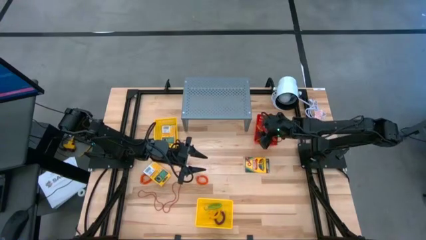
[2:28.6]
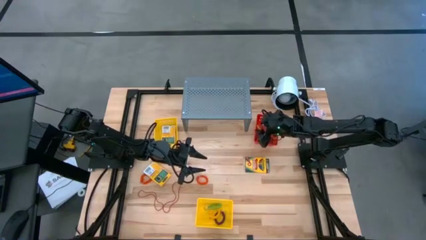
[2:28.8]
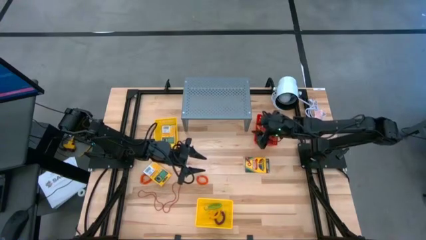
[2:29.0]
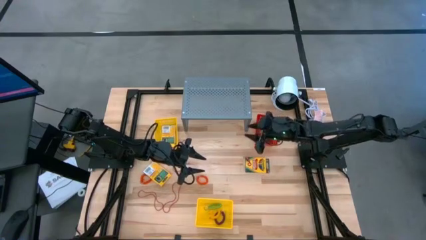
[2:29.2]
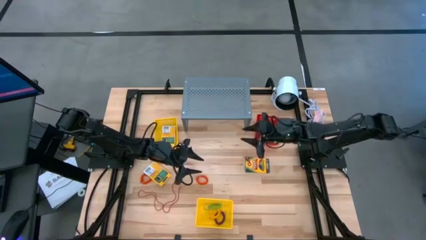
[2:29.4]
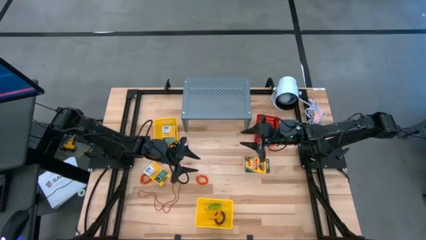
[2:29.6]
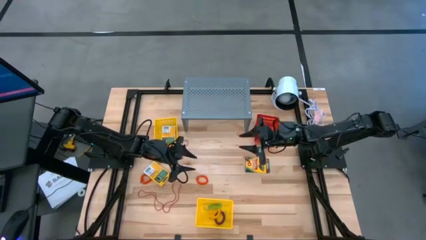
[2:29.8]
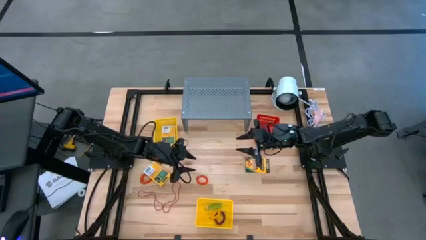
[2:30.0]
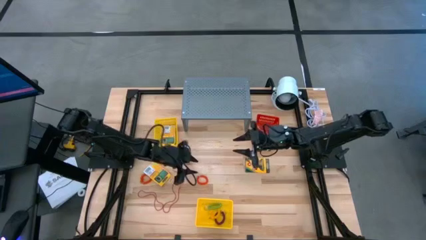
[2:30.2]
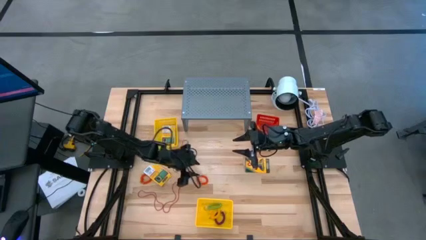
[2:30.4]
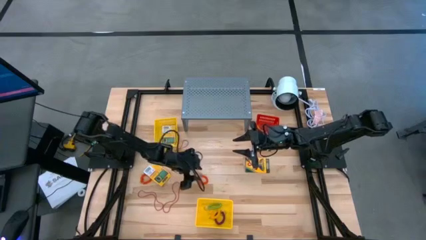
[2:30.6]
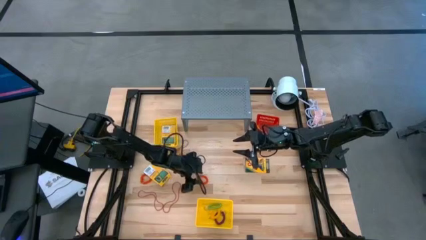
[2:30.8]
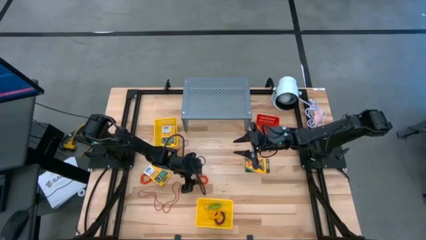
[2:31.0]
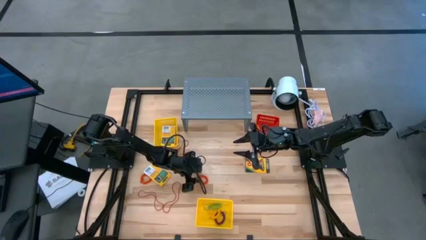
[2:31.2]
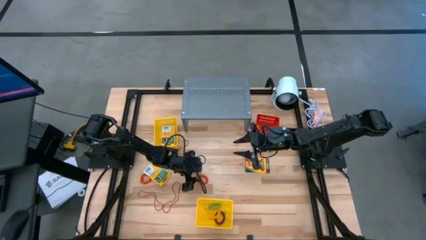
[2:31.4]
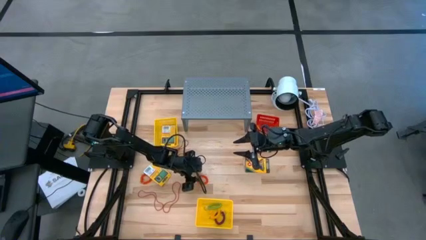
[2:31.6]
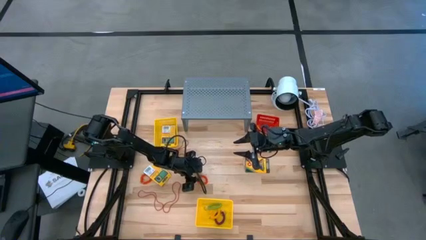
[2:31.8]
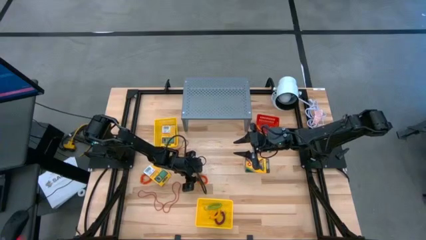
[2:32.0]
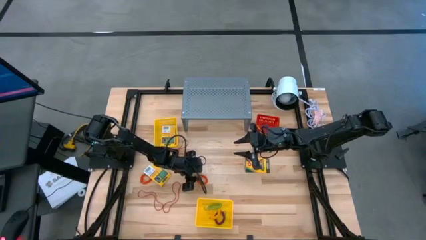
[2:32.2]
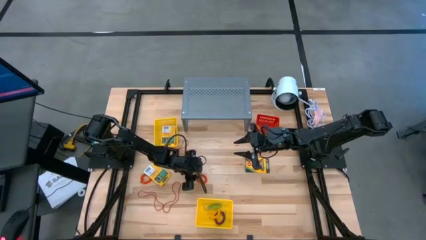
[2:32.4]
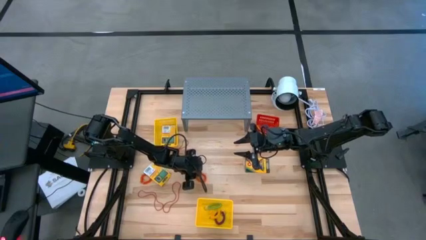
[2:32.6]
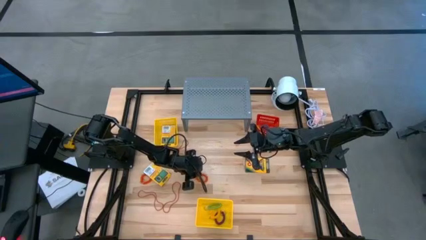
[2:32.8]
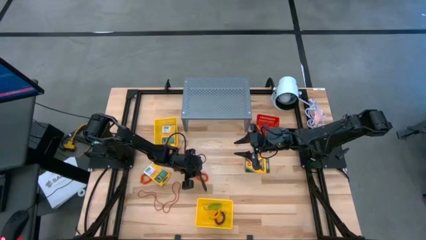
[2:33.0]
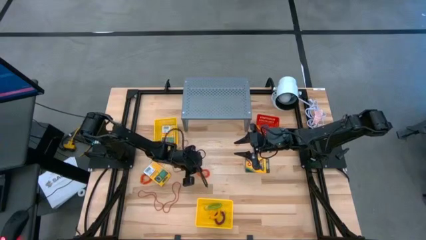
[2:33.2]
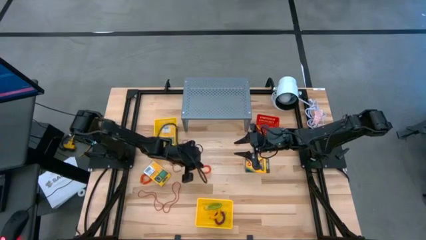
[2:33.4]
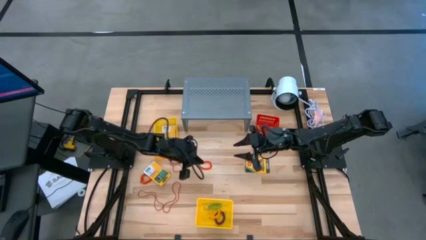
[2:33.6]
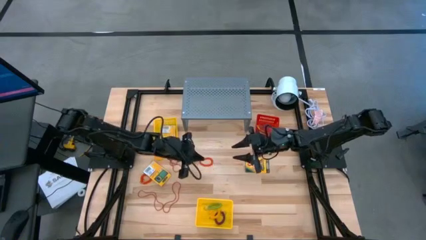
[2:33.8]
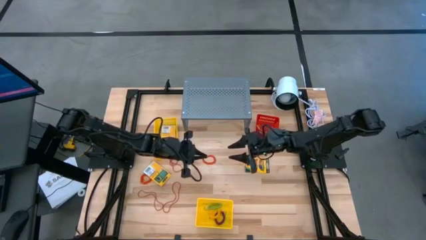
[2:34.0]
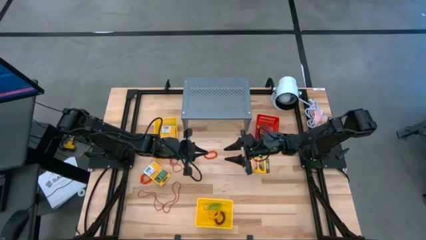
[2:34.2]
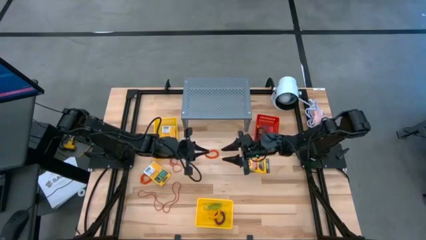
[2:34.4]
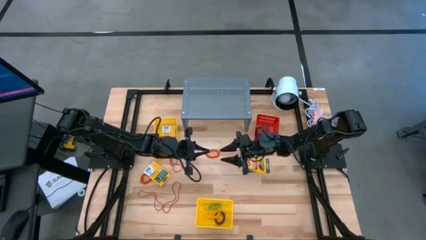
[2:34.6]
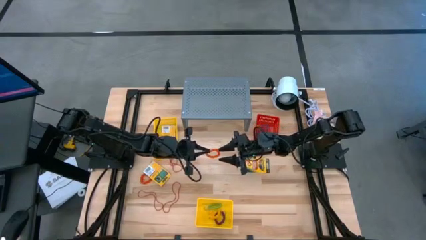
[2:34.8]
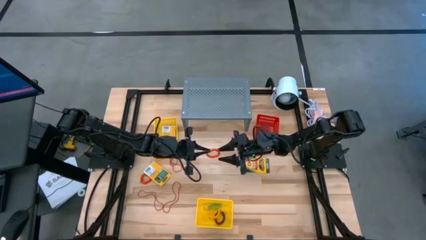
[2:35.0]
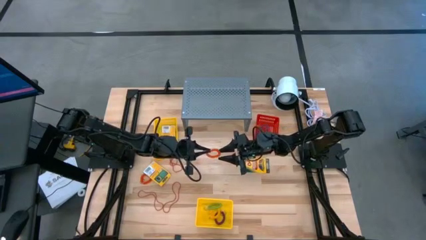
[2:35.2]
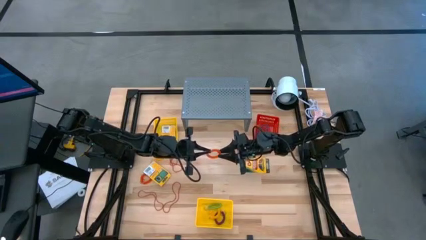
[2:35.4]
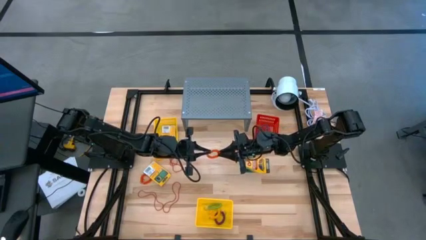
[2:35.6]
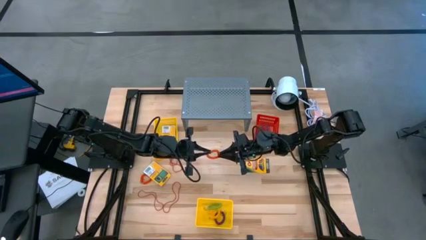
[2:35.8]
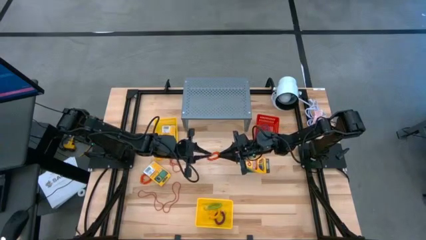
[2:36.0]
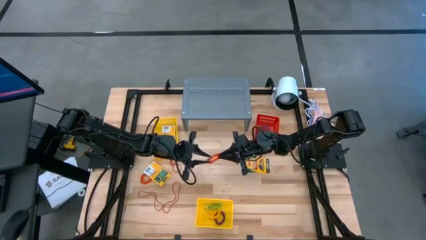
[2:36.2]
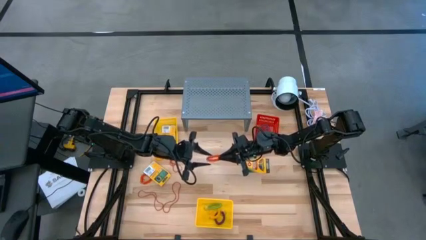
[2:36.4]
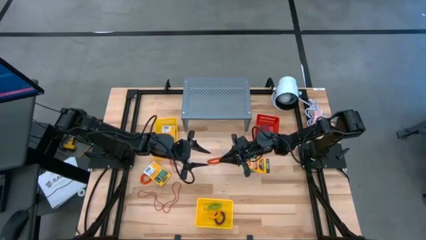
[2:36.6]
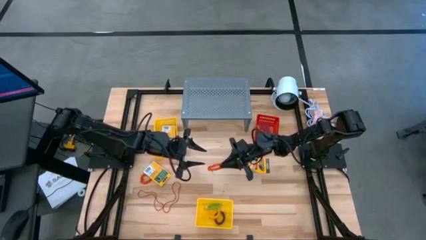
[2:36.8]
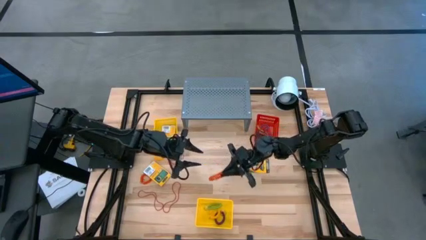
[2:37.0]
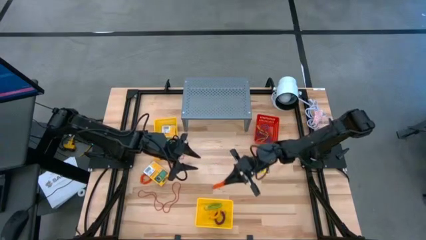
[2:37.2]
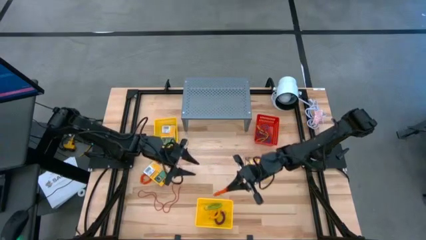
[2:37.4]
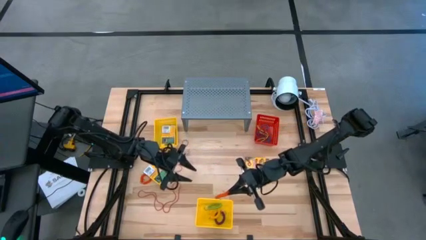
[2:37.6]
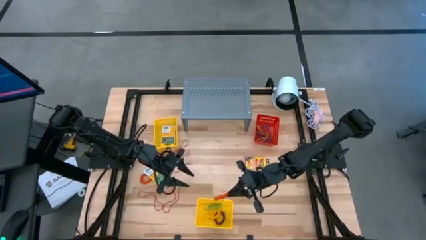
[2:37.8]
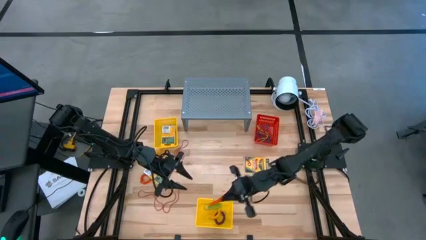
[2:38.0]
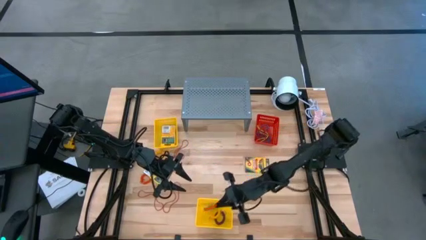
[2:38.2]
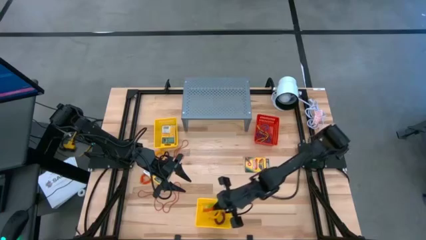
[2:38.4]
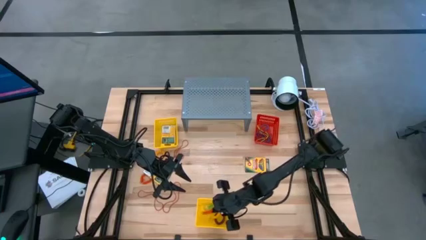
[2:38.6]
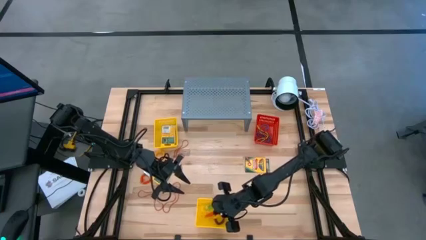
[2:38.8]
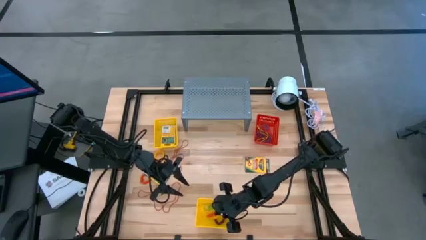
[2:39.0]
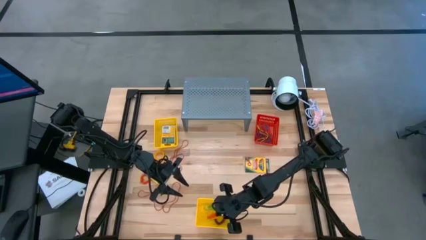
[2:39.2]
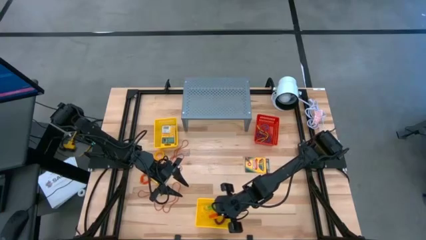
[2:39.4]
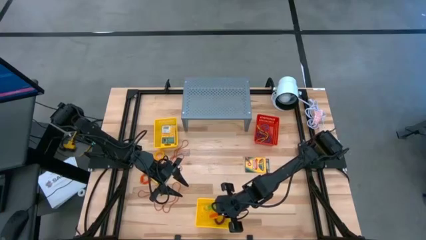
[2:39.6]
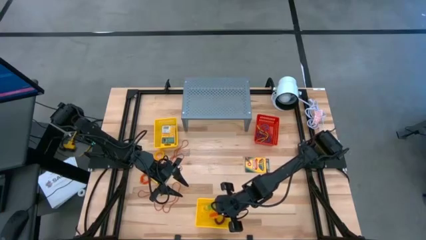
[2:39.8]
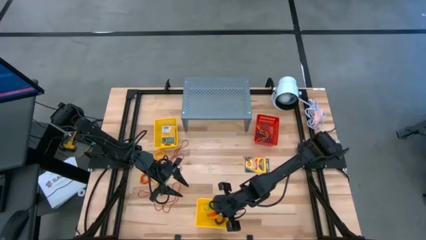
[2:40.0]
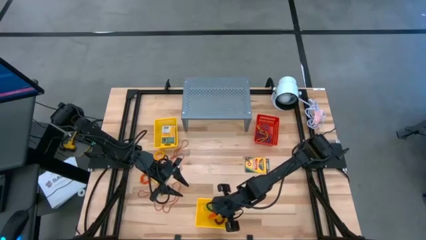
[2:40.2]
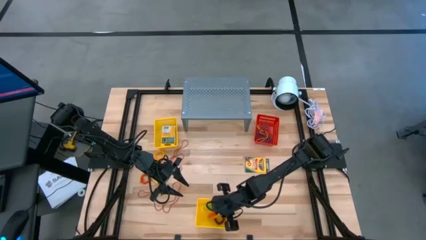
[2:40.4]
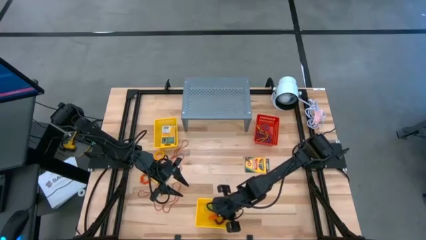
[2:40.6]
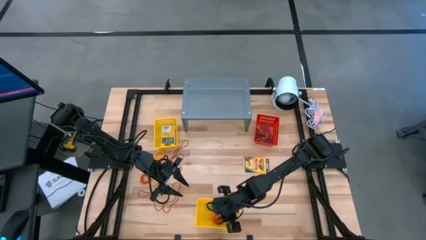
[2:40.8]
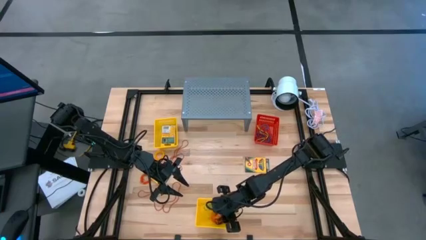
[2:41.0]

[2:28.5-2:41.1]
Task: Pick & Place Office Desk Supplies
Put the orange spiral keychain into the bottom yellow bin
